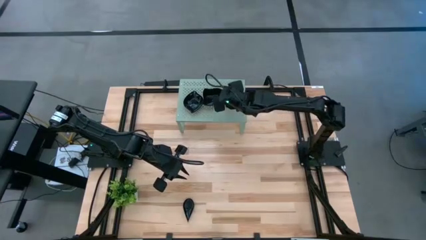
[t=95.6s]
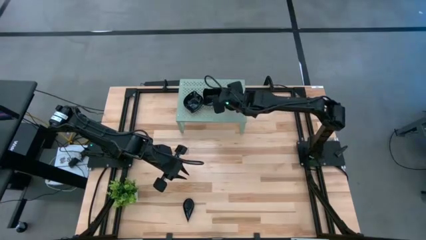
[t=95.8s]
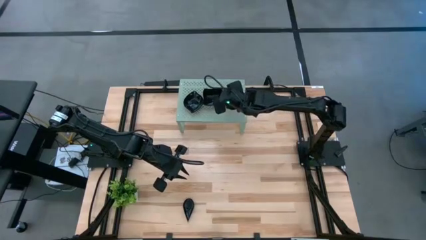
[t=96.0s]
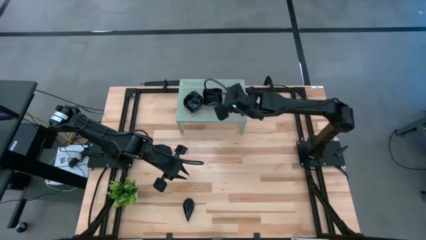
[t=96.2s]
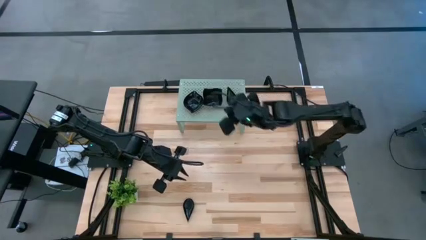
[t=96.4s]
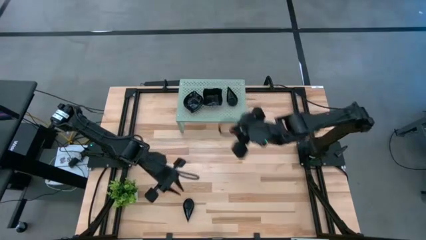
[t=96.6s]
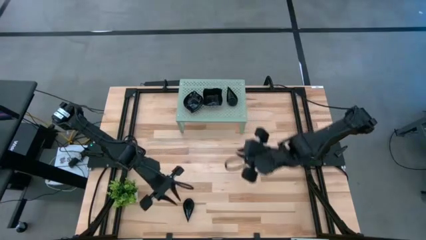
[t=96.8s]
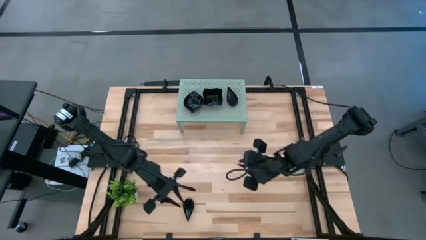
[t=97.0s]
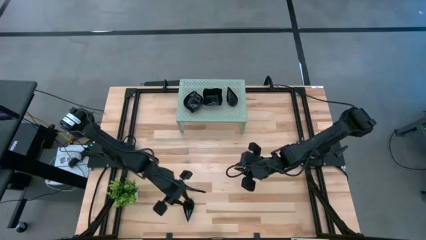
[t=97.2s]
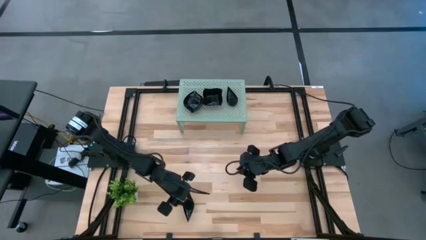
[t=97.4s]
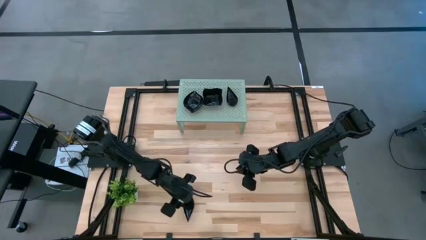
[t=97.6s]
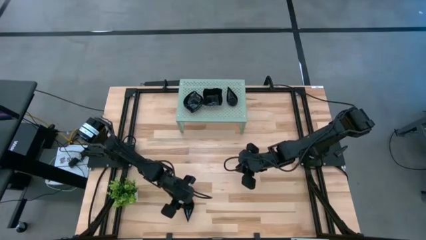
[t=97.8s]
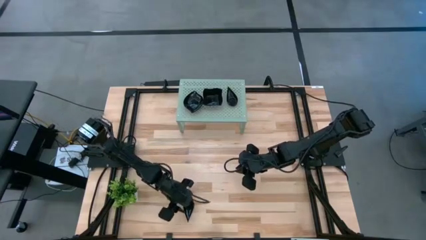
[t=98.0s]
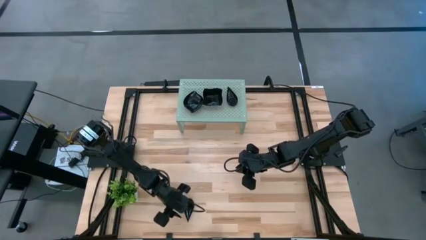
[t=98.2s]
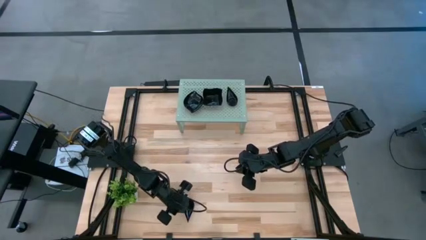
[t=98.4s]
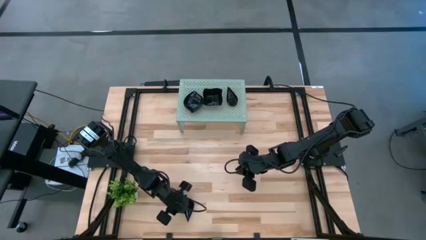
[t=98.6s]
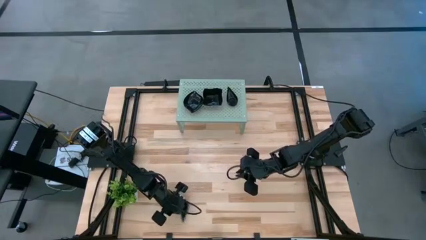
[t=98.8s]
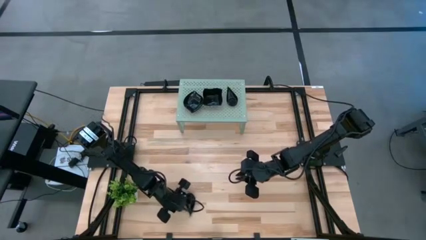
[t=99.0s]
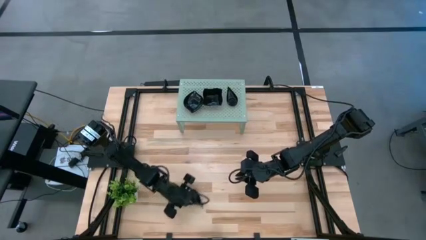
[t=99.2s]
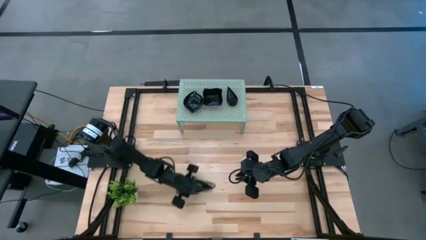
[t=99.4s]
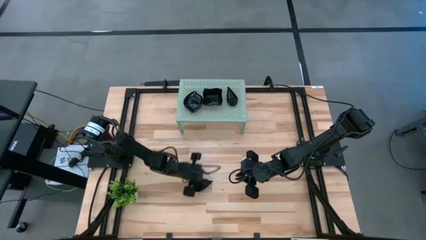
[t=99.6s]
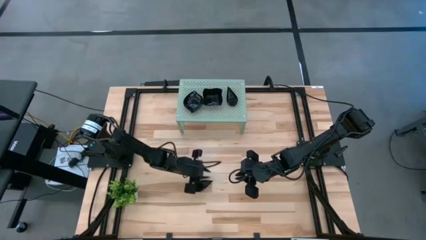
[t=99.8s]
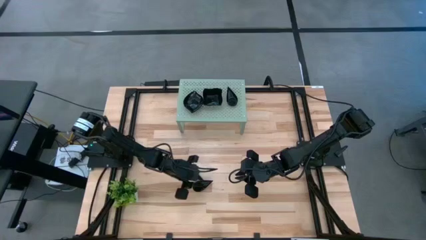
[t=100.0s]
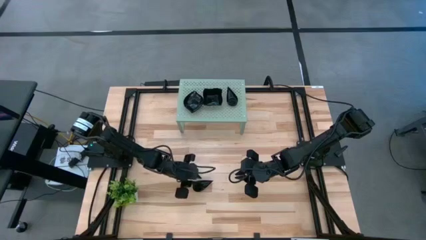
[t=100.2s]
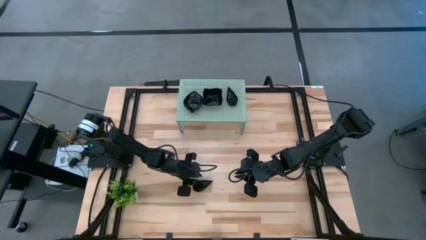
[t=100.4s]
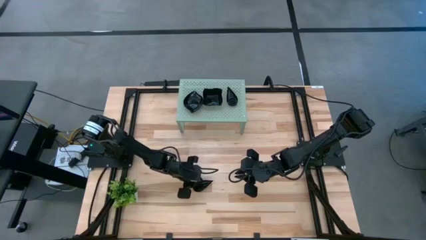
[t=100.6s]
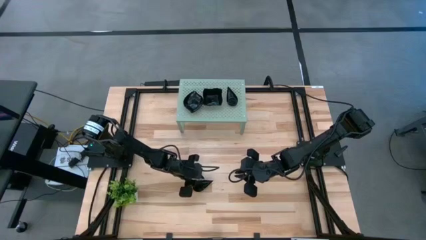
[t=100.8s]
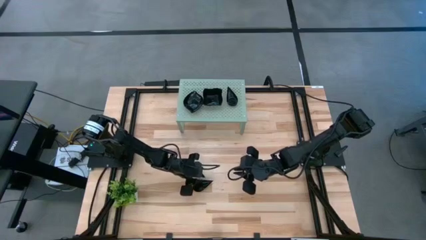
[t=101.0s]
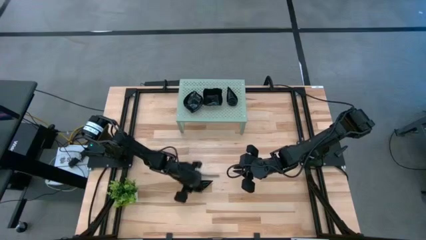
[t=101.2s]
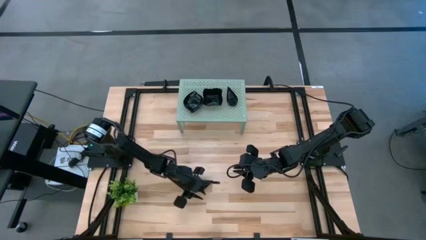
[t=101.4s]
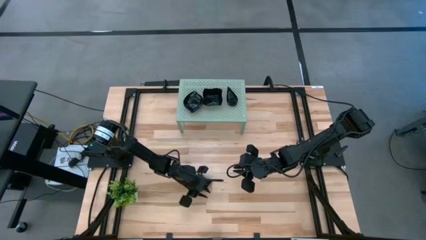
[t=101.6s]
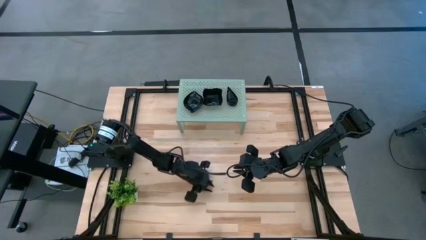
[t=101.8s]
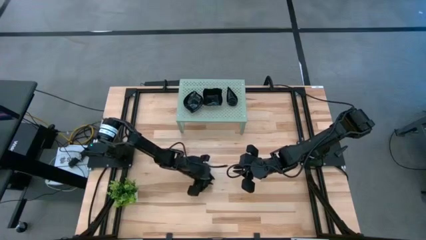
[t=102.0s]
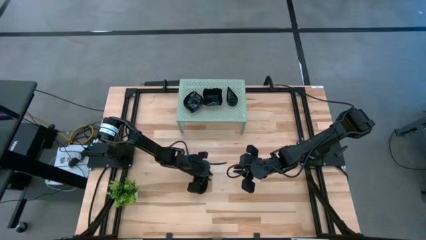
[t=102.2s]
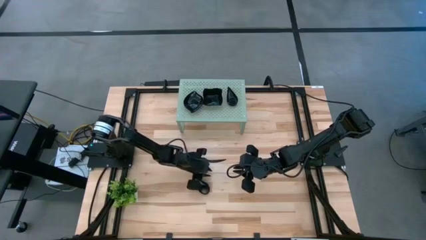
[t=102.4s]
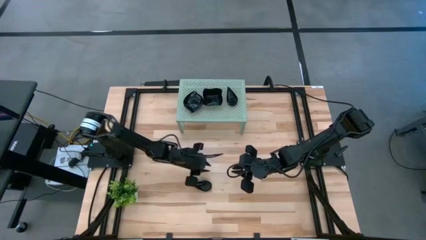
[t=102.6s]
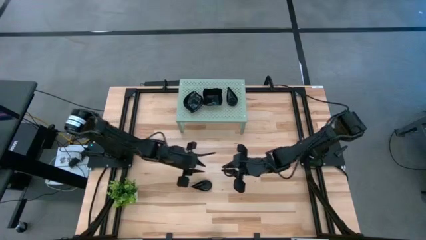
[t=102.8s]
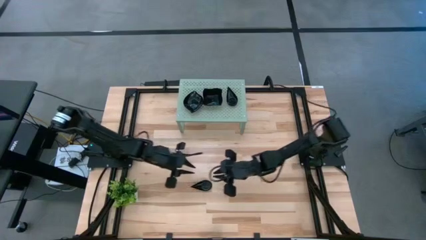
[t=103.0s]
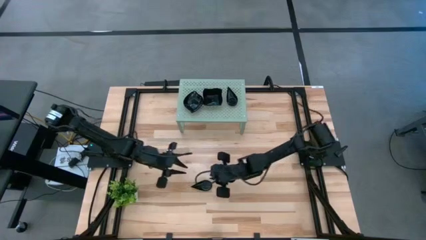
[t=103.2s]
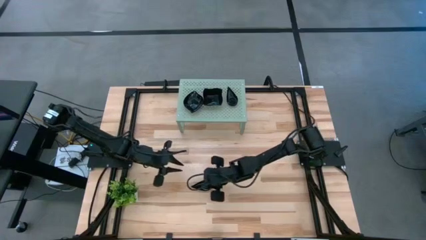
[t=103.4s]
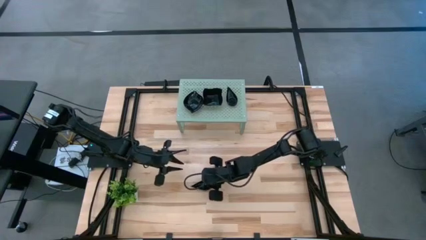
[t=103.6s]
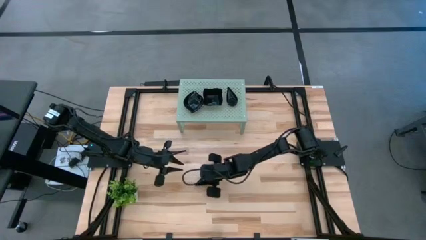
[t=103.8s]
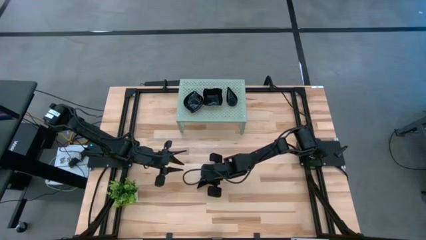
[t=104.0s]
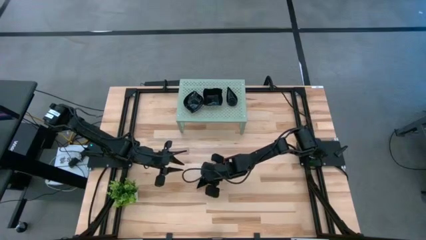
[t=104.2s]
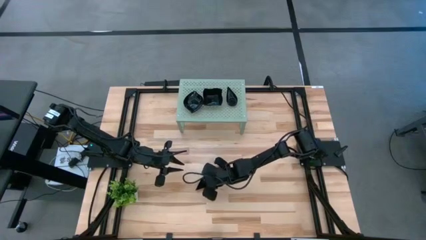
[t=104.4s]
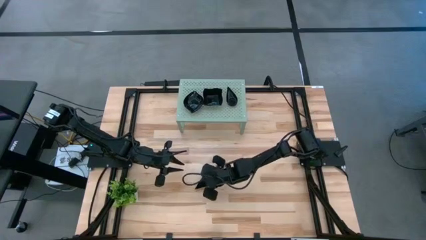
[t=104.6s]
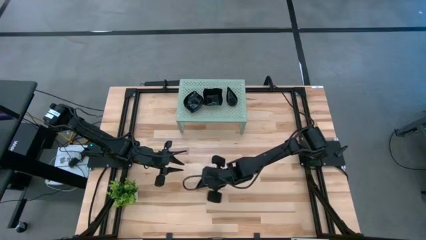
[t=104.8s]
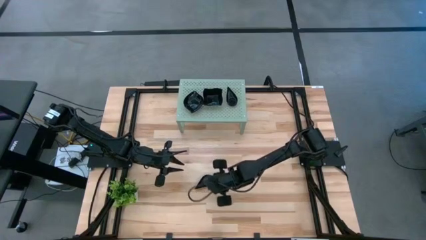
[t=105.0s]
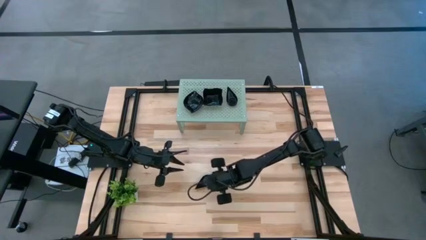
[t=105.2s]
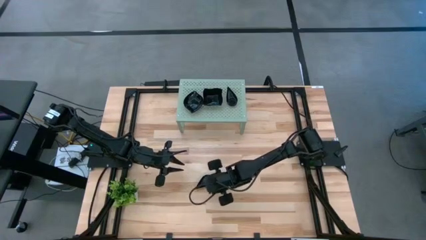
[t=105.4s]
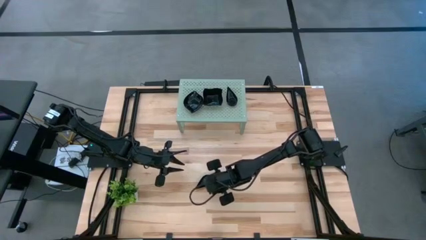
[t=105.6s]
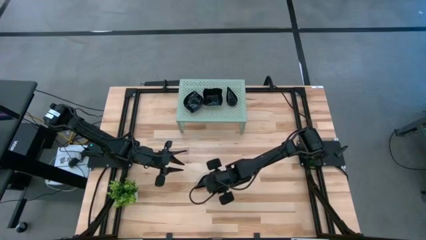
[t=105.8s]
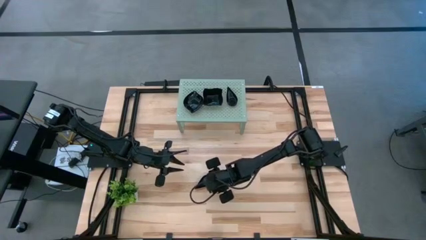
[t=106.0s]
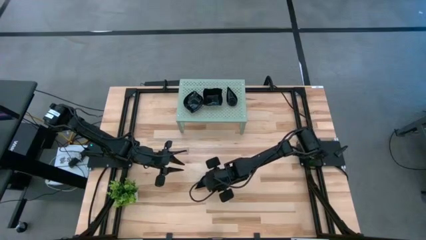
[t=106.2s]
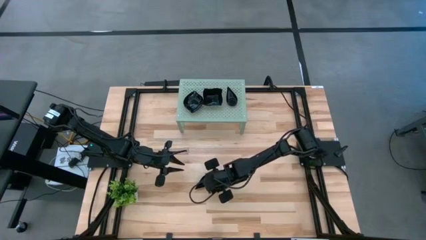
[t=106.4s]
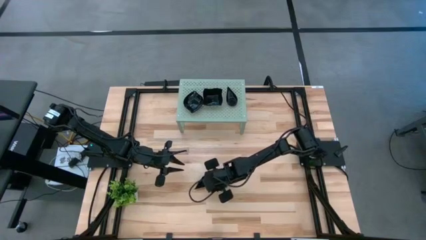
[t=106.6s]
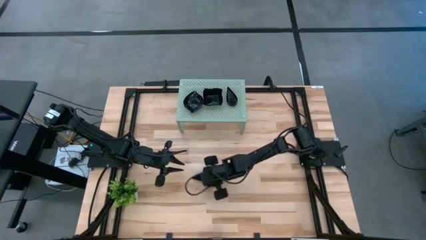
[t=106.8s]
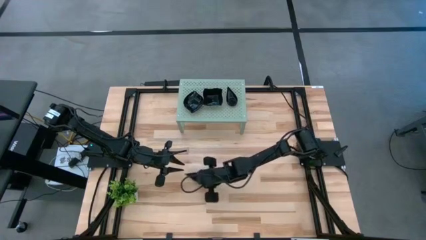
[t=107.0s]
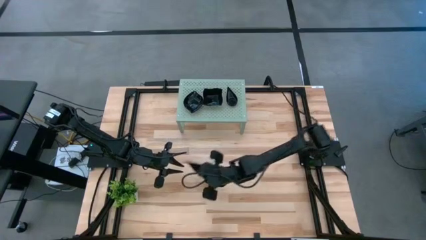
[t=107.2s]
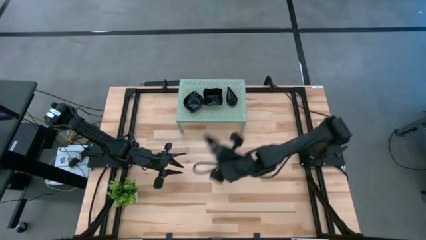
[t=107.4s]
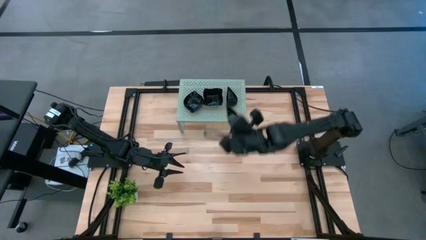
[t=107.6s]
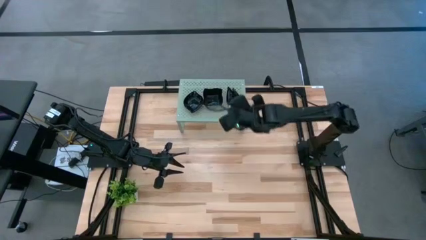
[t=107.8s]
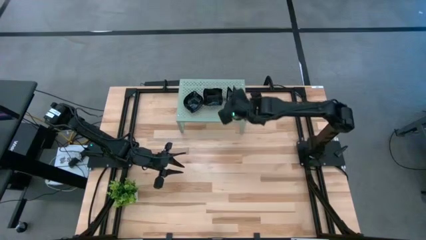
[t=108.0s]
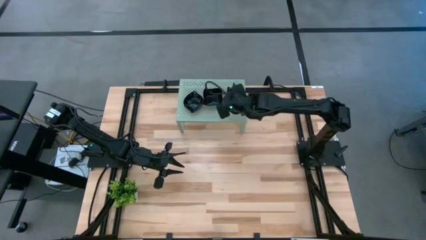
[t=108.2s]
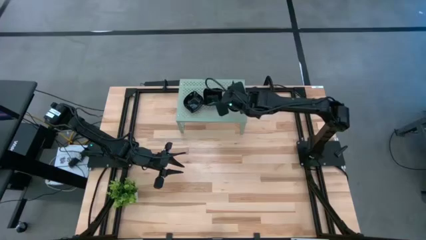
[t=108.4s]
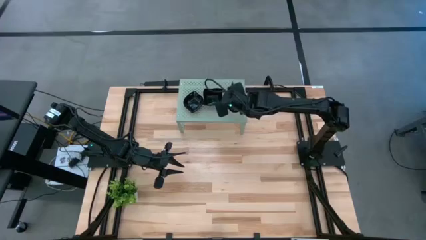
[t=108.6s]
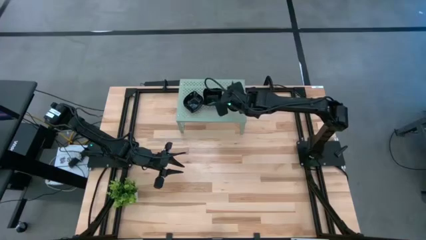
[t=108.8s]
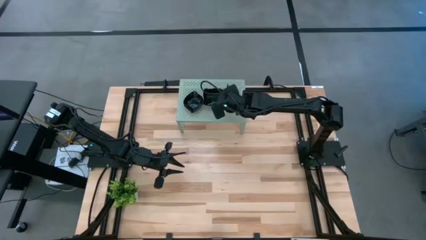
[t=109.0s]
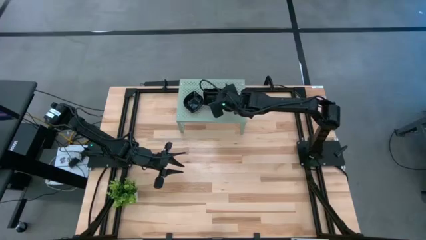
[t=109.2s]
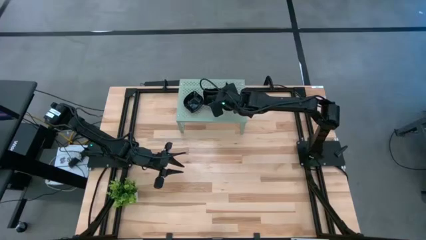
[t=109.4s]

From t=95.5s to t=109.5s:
Task: Pick & Place Mini shaped plates
Stack the drop-shaped plate on top of the other drop-shaped plate on the shelf
